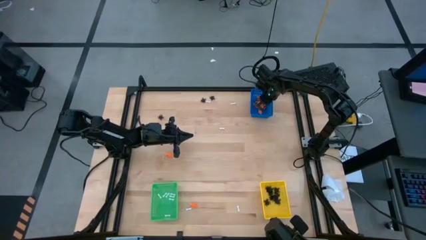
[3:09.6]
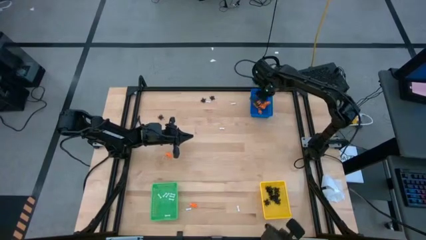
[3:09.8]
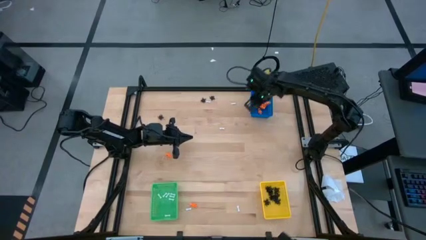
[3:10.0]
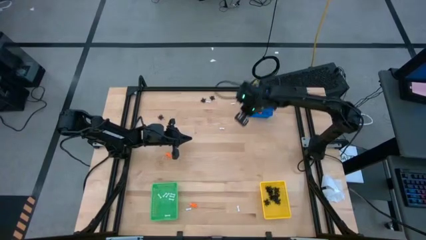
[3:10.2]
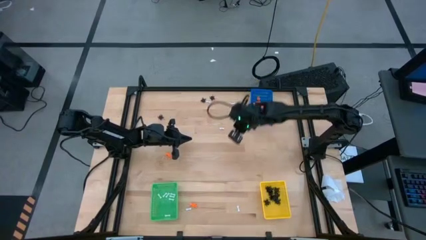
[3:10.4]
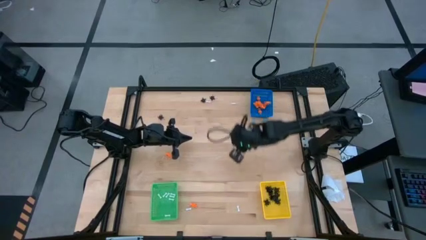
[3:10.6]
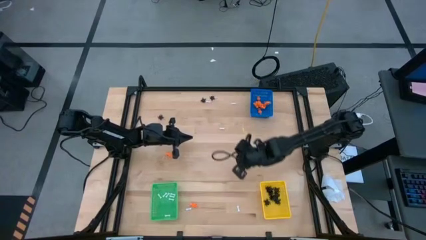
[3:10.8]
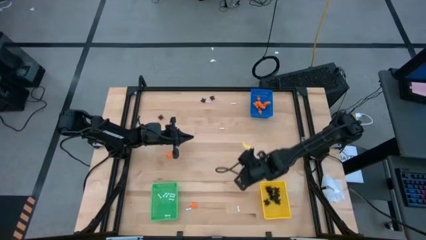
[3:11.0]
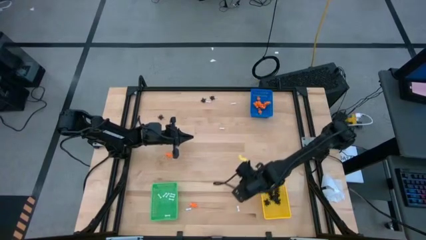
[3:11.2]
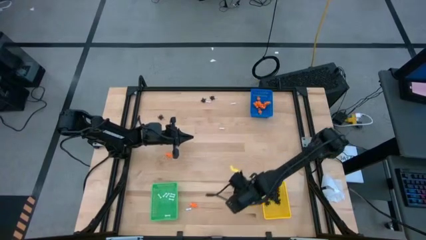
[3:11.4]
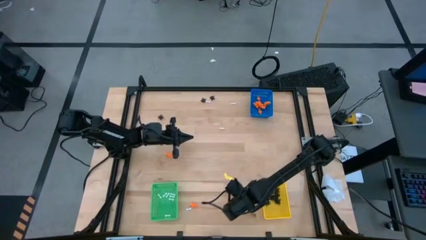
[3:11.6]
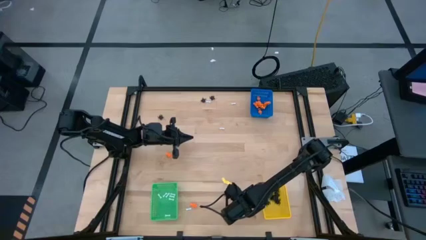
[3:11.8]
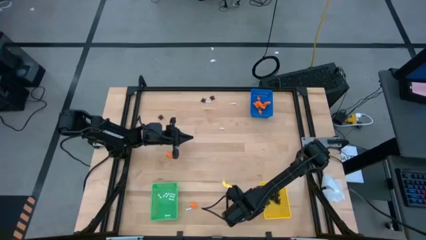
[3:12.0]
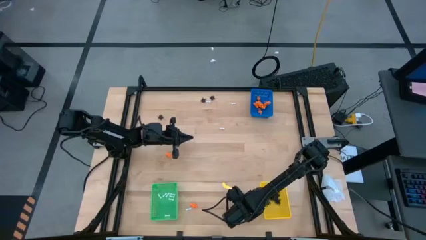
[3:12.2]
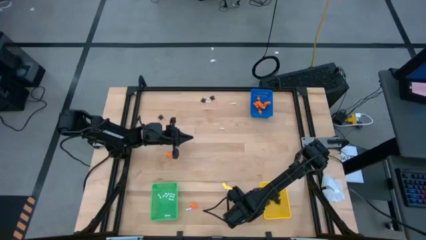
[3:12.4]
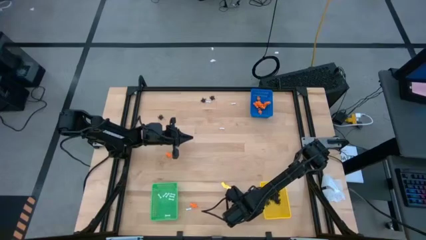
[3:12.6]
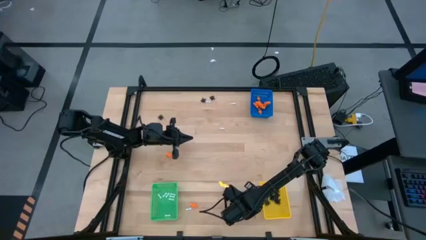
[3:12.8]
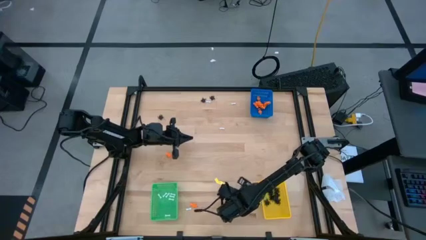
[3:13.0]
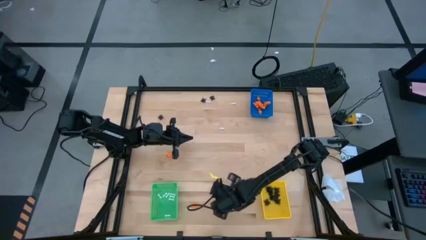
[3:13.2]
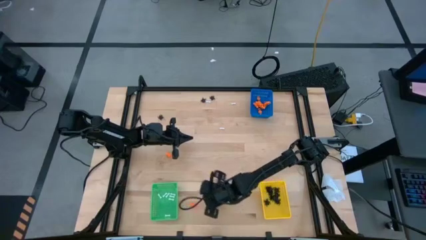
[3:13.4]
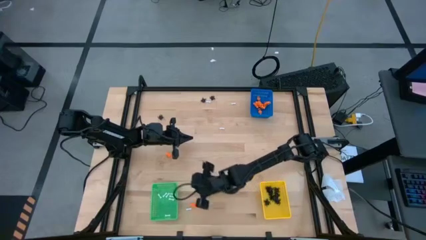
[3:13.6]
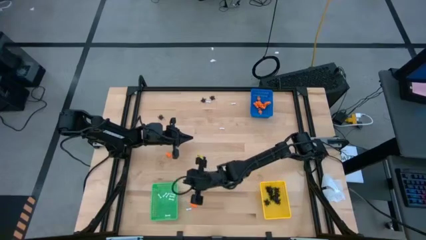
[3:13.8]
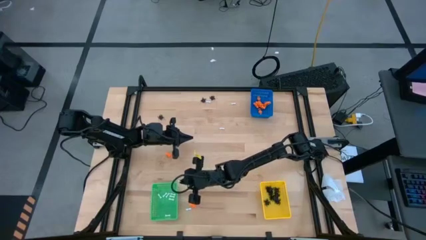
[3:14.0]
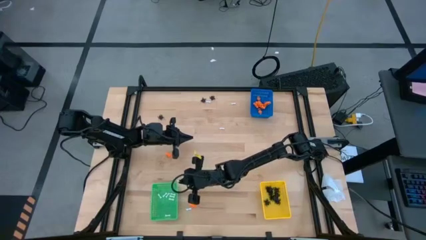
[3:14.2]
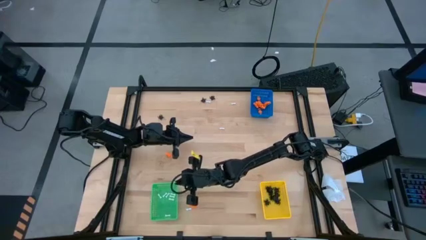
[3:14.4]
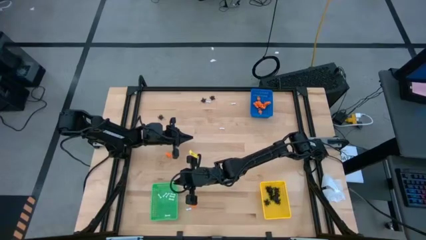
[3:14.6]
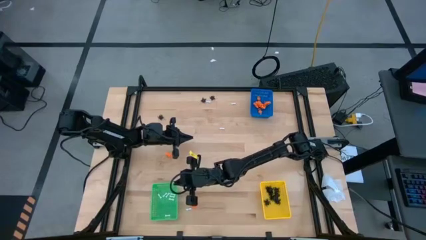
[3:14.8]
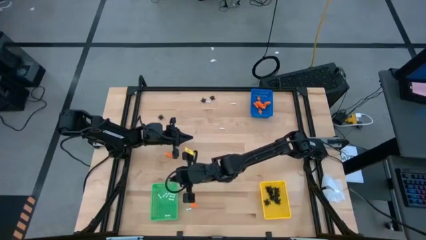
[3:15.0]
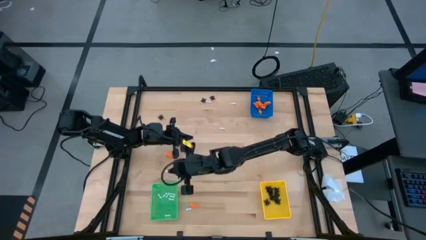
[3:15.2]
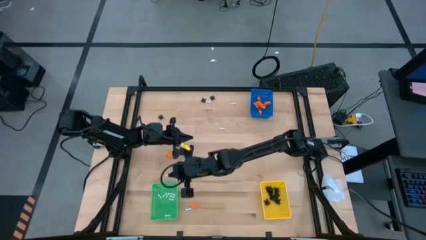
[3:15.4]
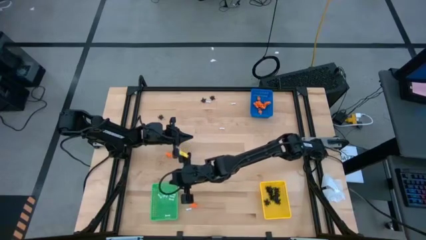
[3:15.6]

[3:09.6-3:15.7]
Task: Sort Halloween decoration
Put the white bone toy into the green bin

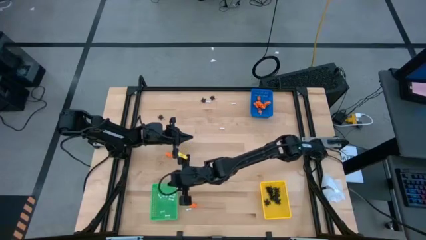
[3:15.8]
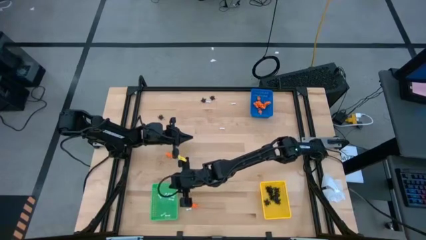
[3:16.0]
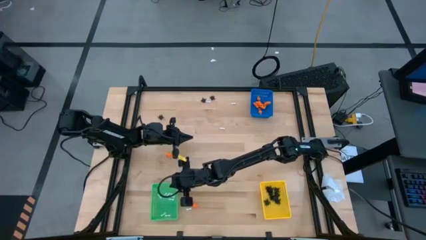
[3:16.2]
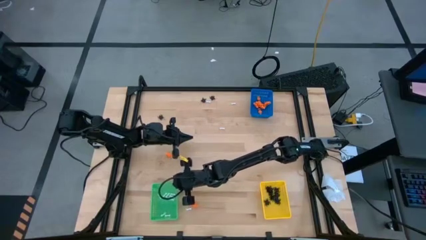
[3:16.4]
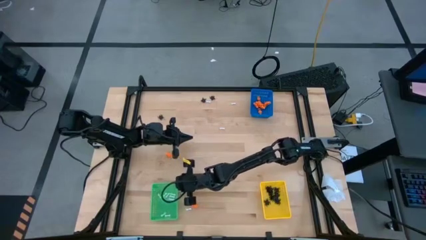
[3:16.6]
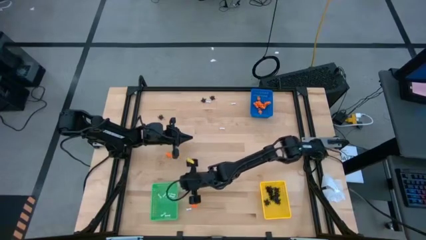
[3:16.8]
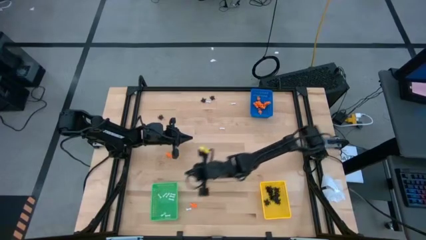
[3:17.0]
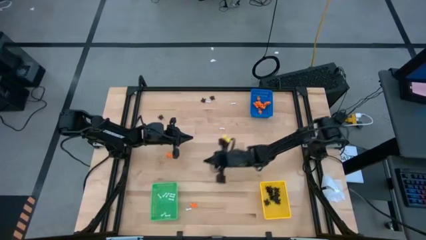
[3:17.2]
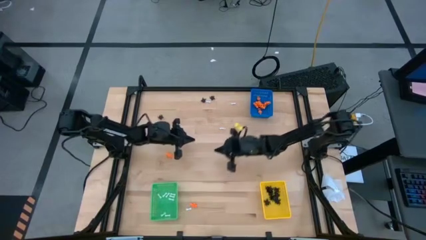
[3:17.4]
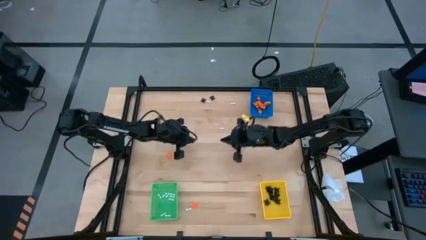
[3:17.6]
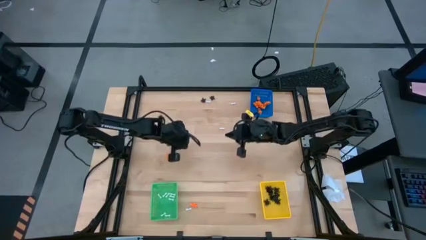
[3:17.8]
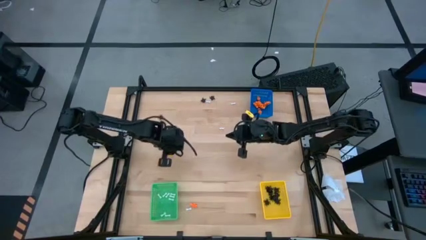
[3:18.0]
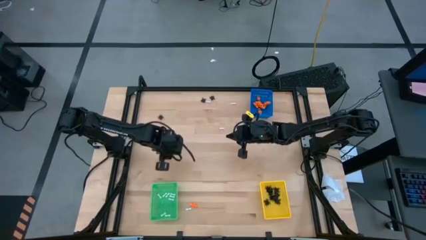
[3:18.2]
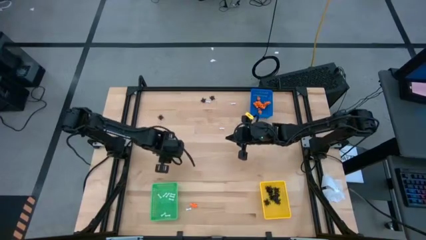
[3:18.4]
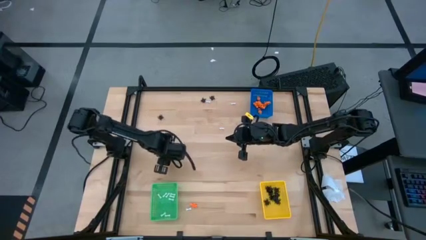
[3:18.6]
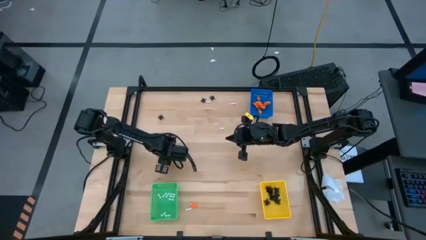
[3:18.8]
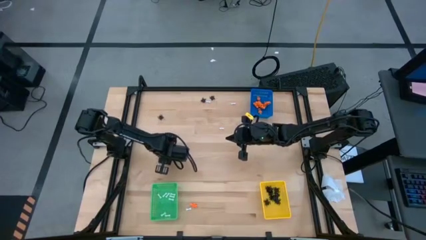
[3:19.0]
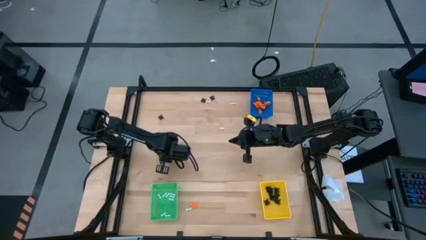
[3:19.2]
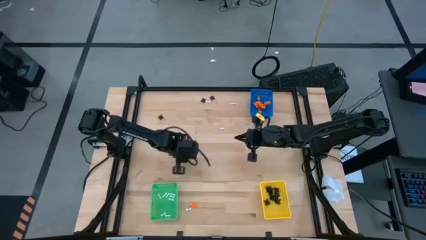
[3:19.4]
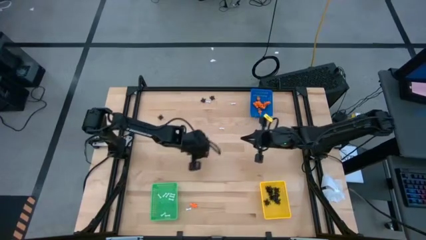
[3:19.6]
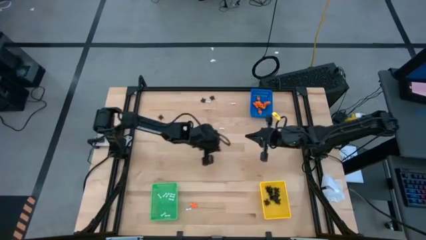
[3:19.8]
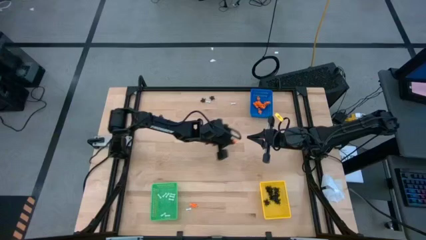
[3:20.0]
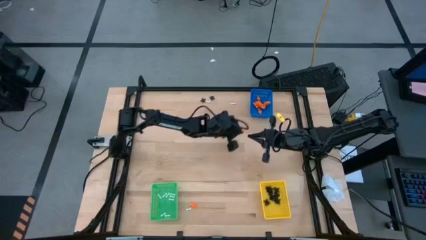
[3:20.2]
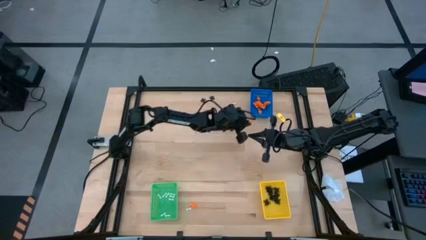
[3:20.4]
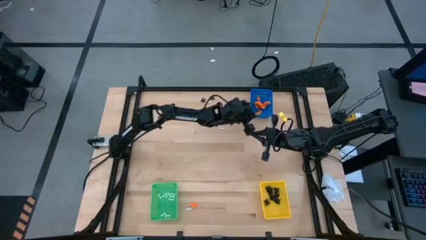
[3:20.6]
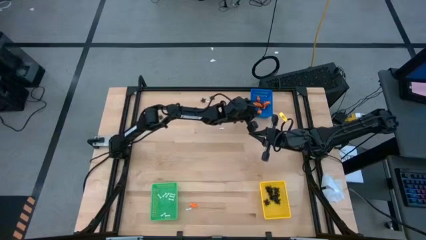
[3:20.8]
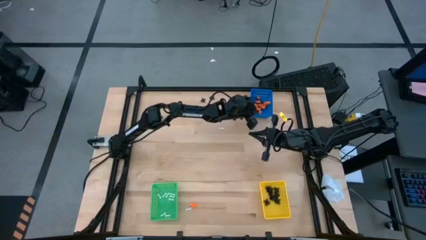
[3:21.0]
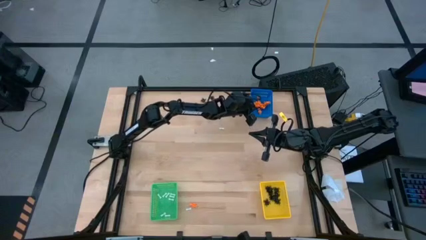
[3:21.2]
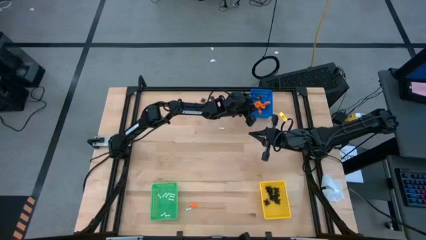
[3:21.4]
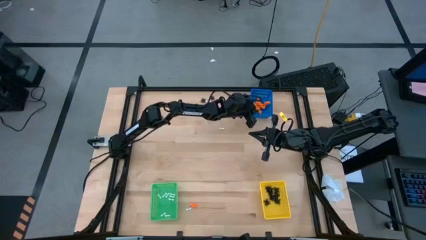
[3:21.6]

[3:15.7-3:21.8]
Put the orange toy skeleton into the blue bin

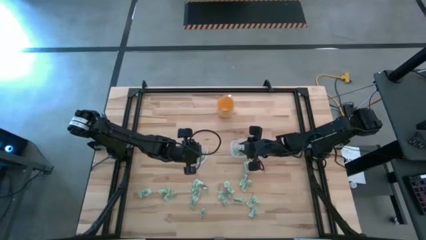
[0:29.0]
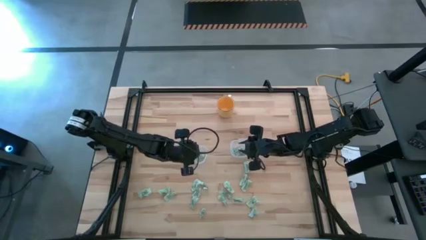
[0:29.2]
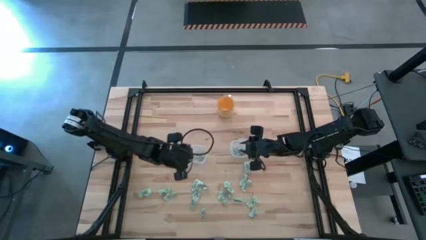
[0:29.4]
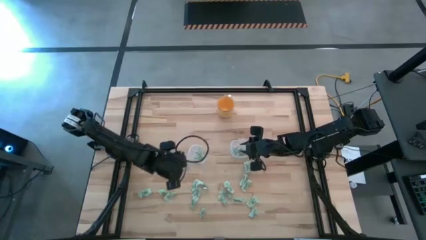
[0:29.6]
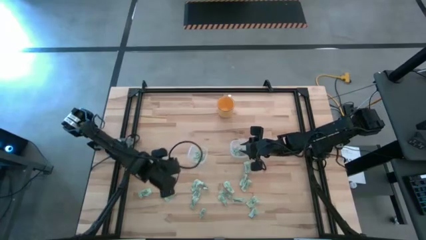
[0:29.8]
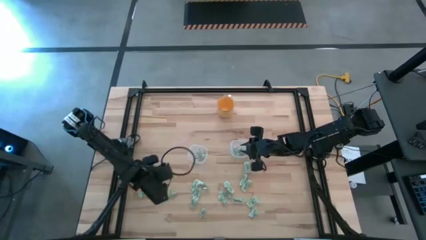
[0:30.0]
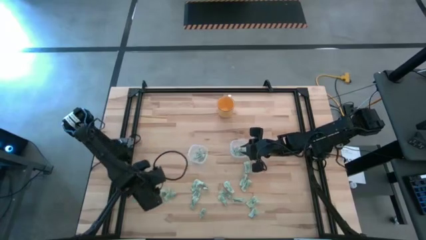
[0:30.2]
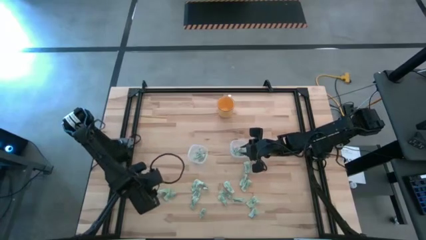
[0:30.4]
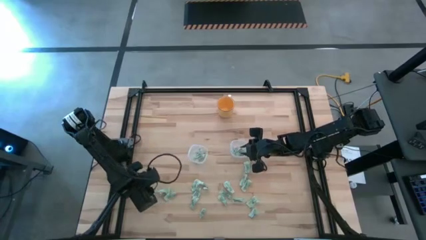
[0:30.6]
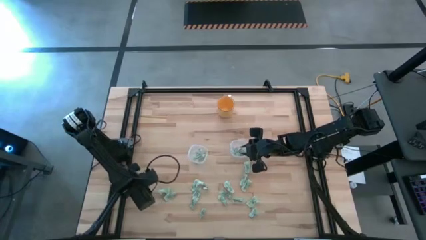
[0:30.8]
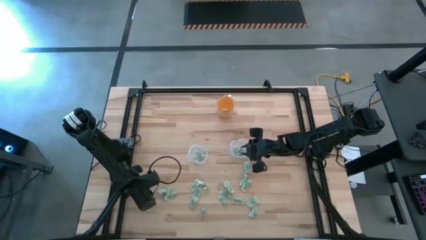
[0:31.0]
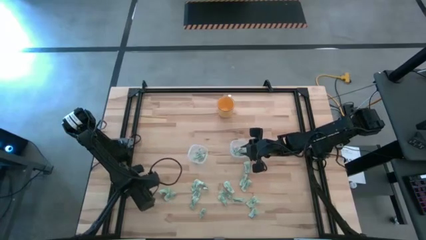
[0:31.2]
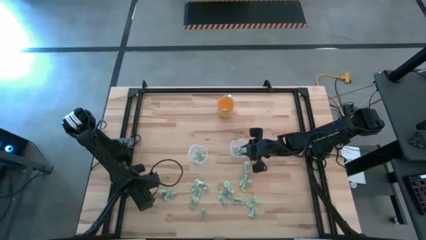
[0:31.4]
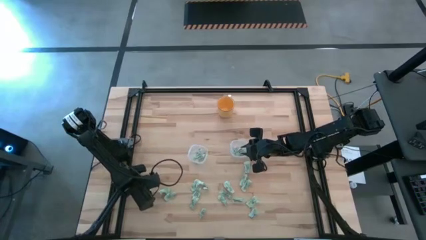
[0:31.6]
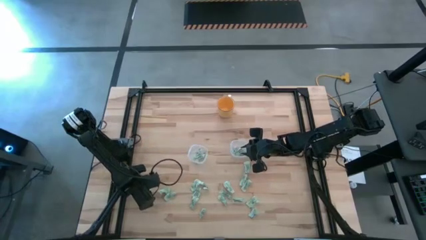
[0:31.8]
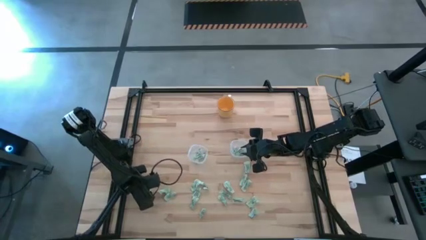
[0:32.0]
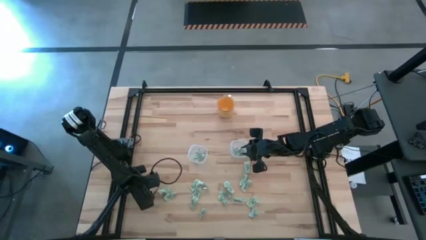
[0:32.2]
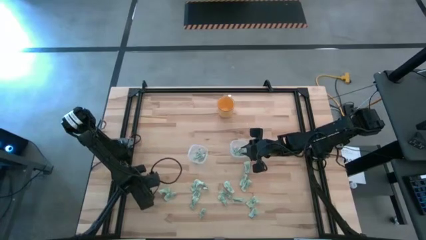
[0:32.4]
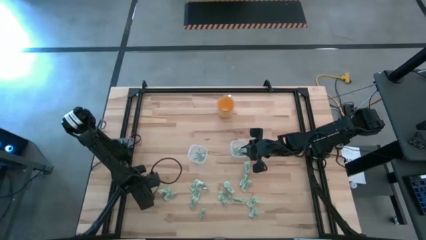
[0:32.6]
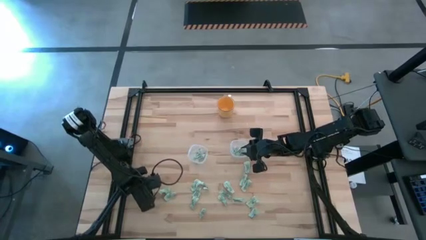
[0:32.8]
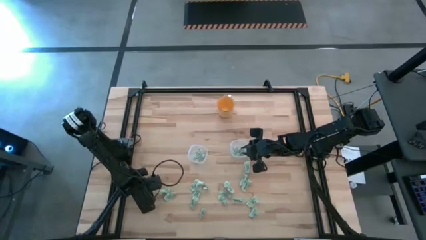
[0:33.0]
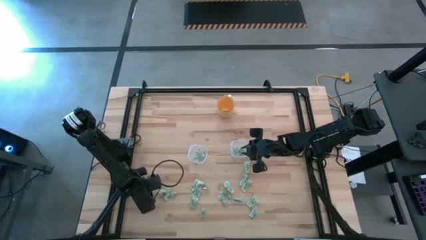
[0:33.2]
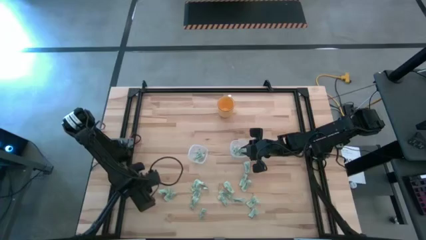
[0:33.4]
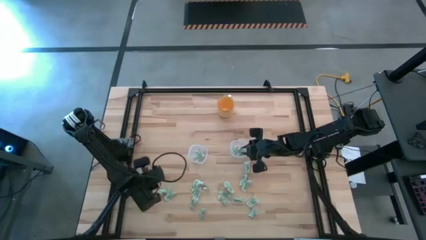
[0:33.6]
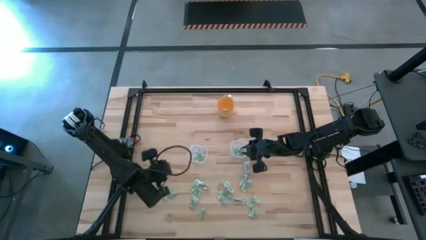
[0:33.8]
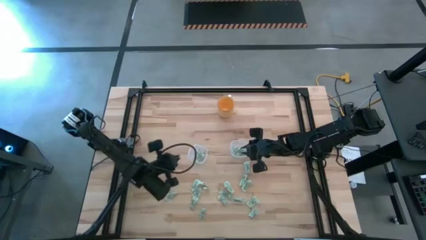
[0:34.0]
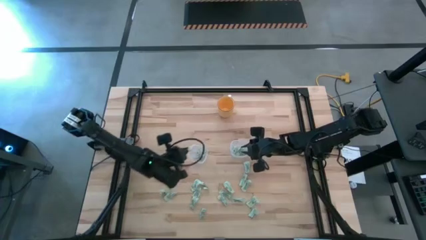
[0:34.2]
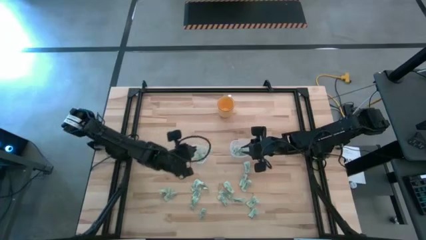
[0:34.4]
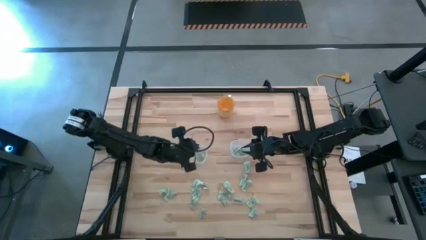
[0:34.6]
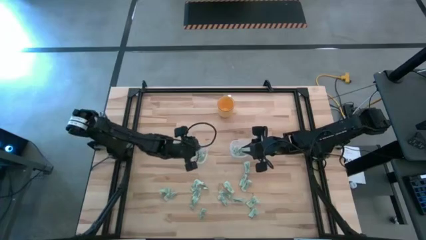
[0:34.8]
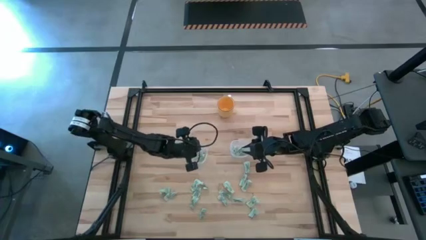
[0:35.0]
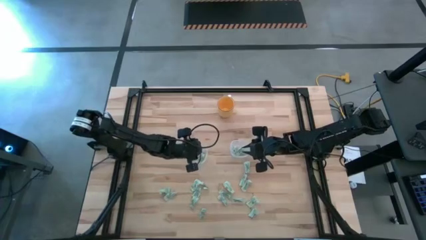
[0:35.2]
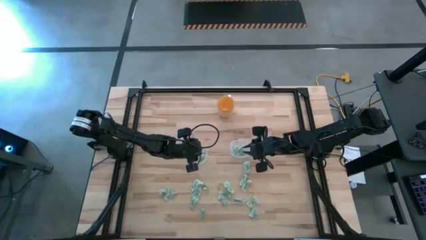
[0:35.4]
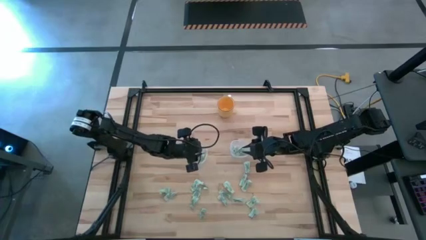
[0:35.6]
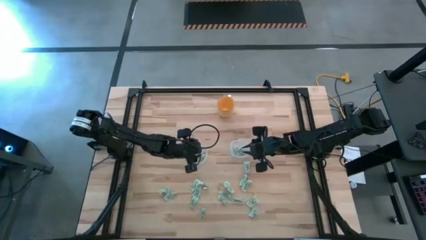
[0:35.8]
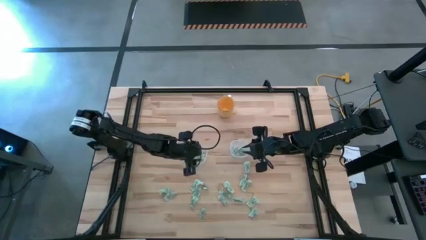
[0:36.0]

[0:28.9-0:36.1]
Task: Pick and place items into bin
Put the green sweetener bag into the left transparent food container
